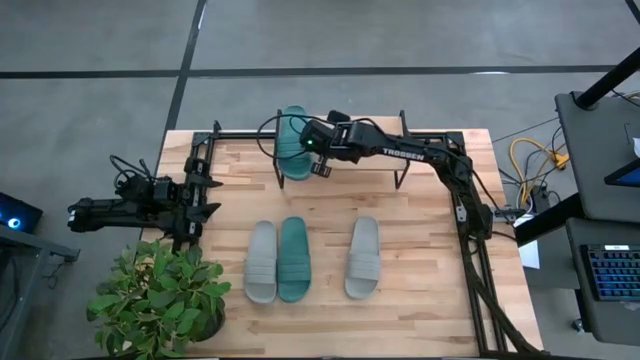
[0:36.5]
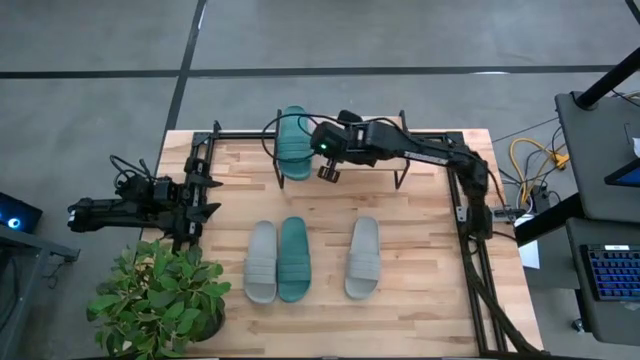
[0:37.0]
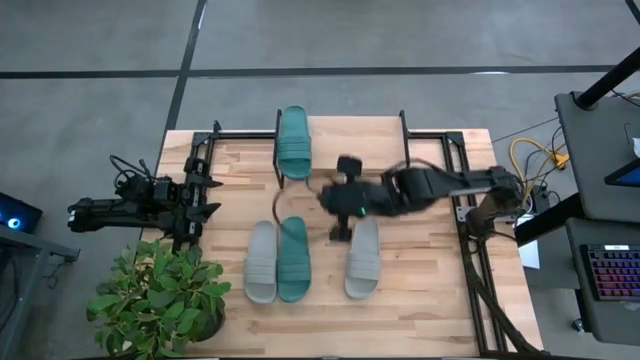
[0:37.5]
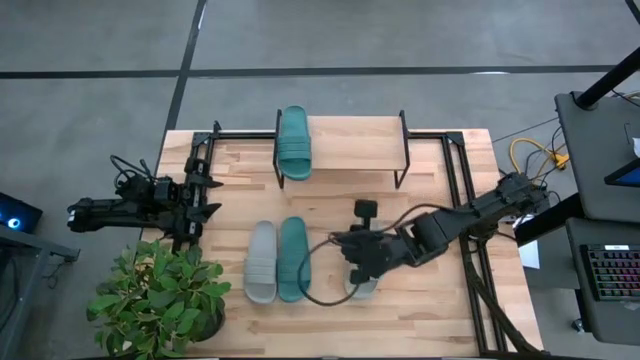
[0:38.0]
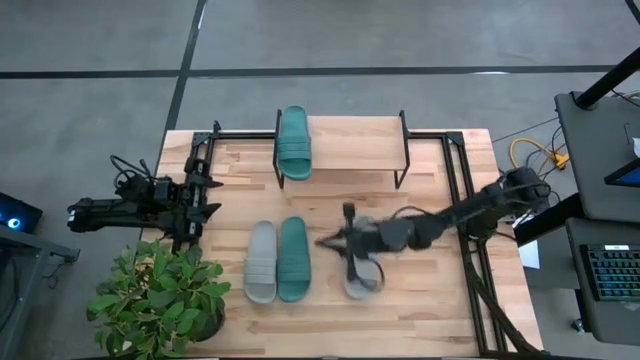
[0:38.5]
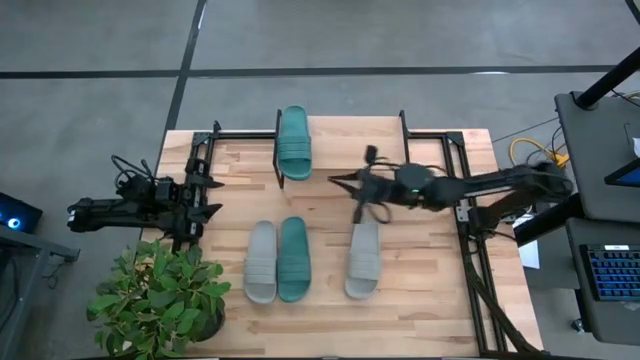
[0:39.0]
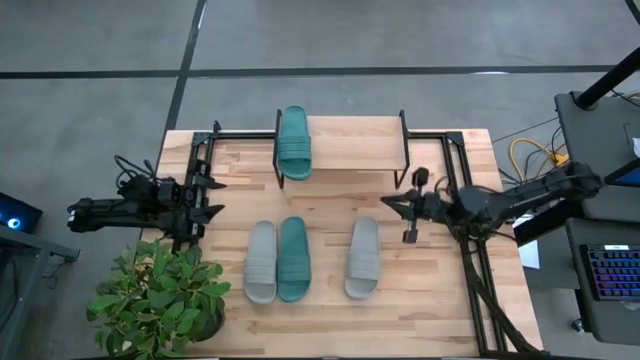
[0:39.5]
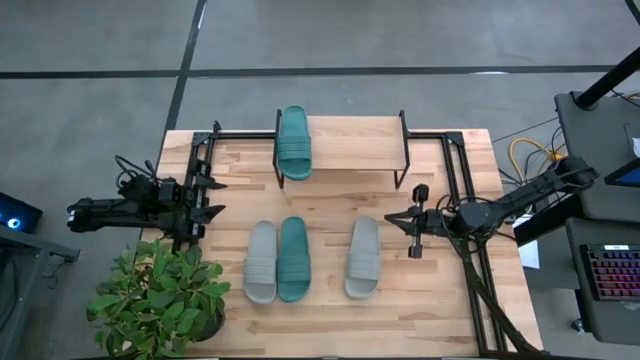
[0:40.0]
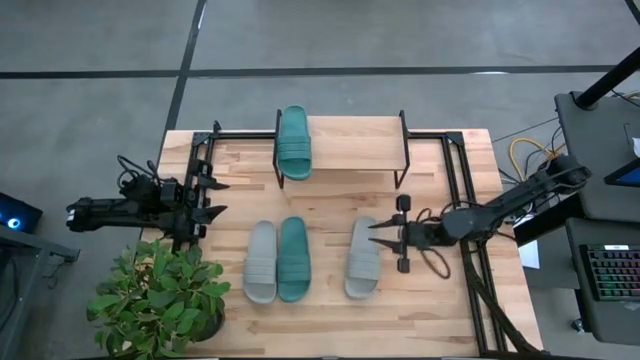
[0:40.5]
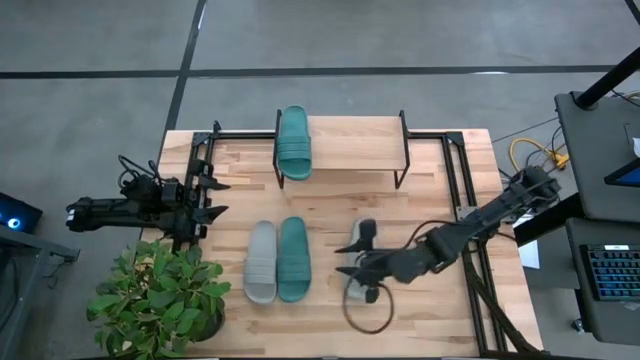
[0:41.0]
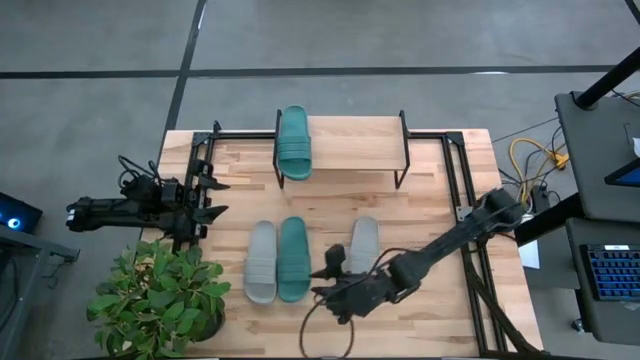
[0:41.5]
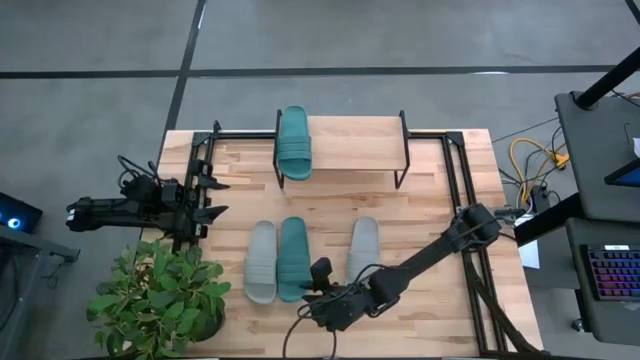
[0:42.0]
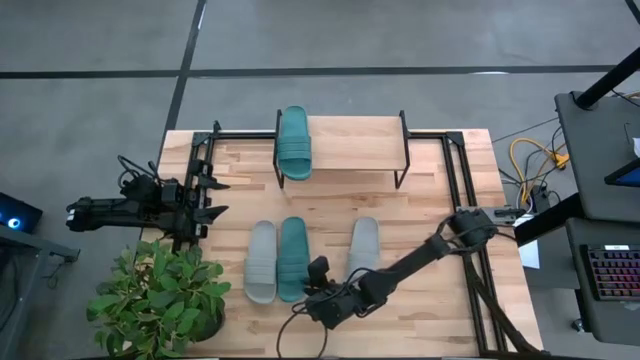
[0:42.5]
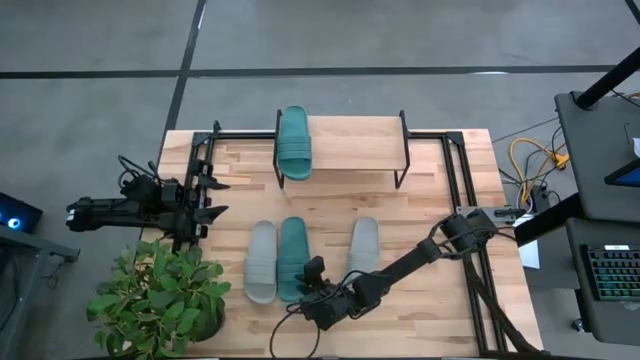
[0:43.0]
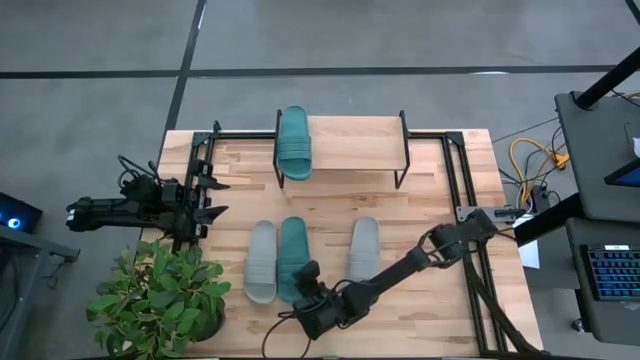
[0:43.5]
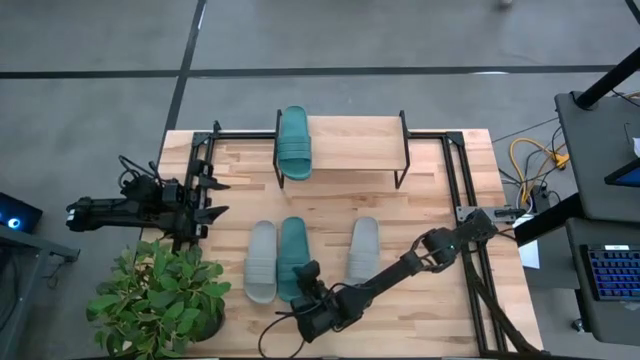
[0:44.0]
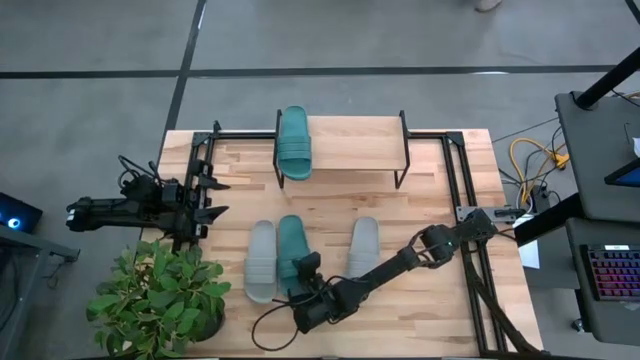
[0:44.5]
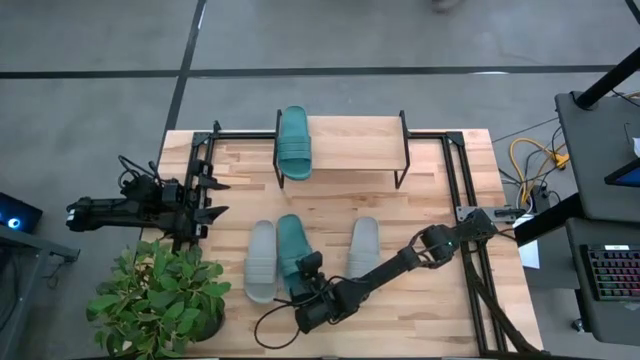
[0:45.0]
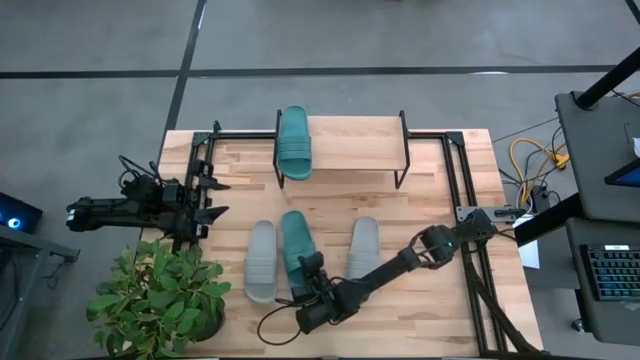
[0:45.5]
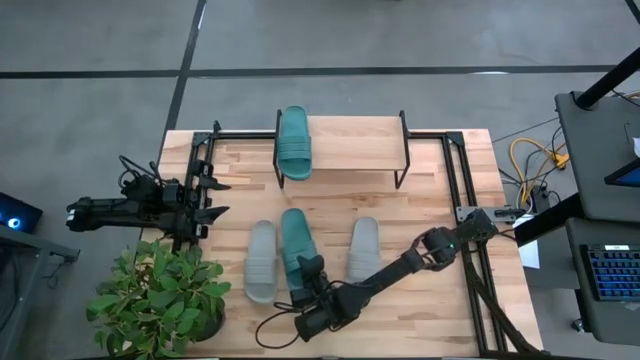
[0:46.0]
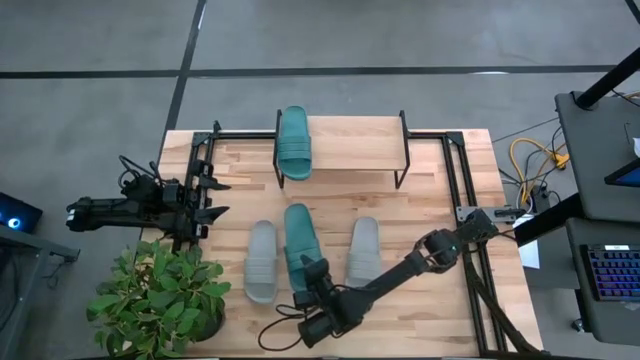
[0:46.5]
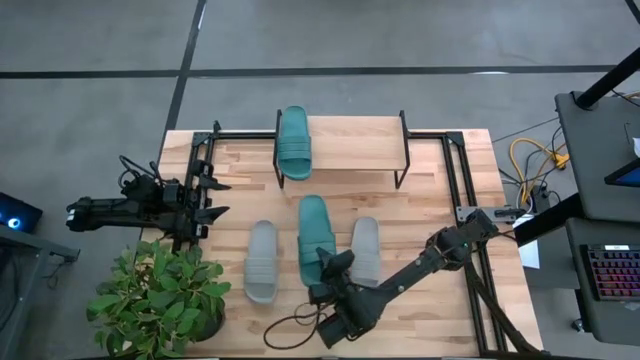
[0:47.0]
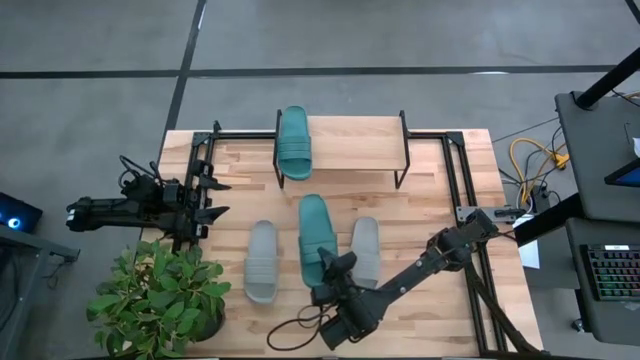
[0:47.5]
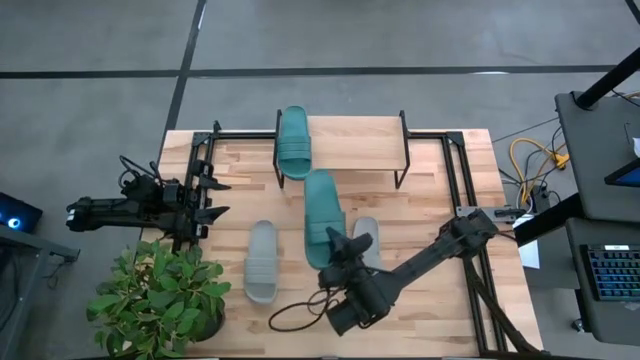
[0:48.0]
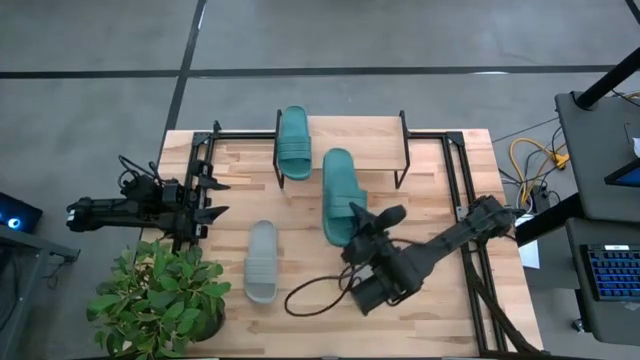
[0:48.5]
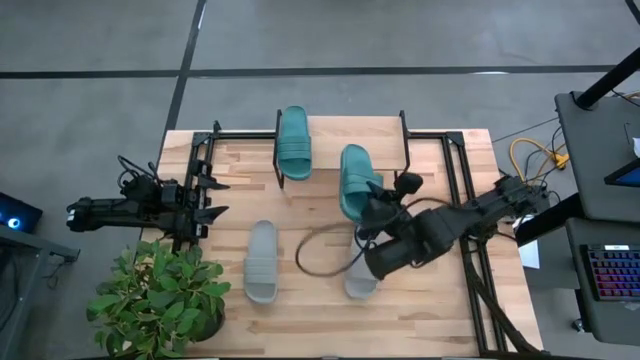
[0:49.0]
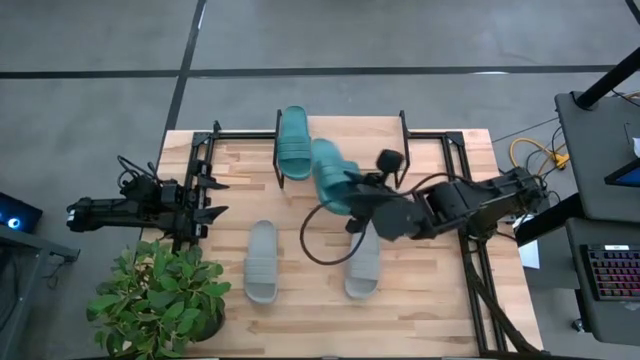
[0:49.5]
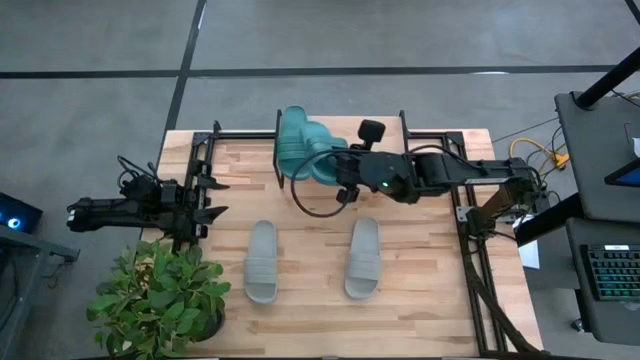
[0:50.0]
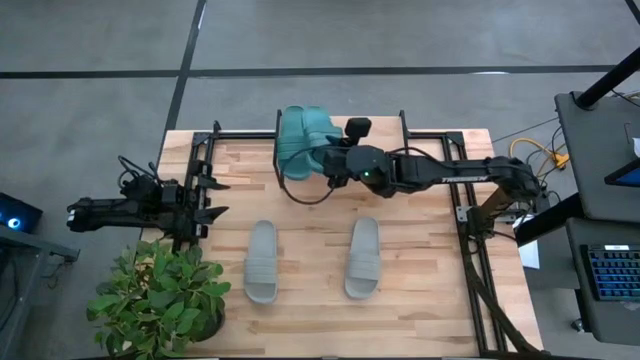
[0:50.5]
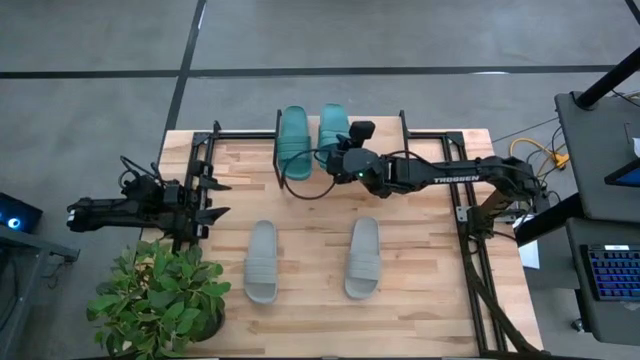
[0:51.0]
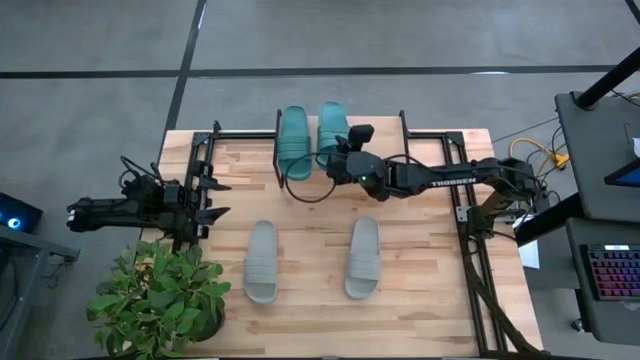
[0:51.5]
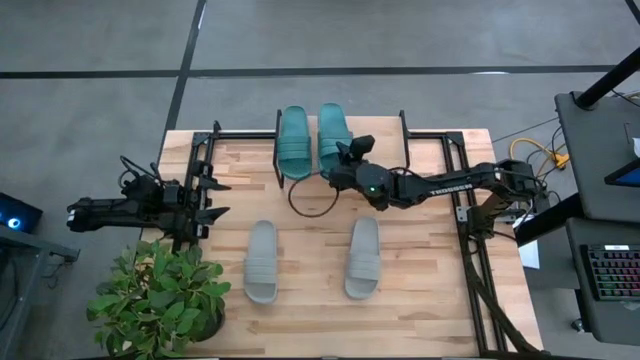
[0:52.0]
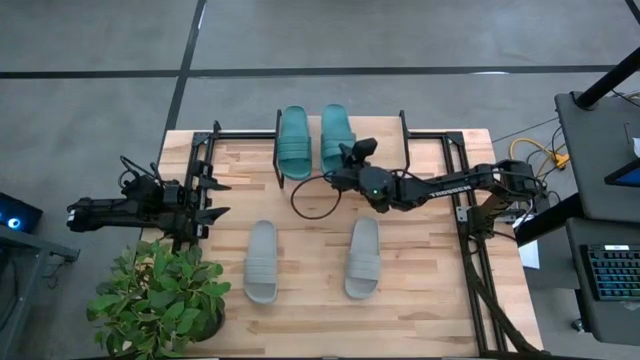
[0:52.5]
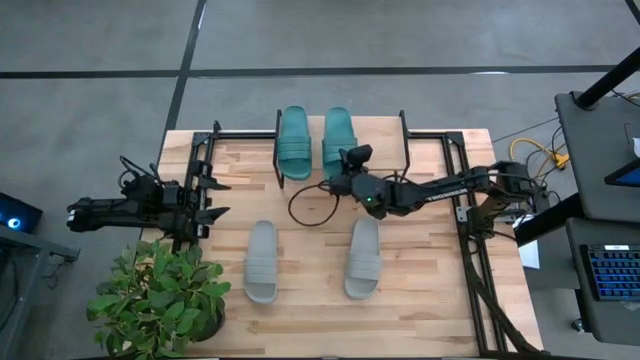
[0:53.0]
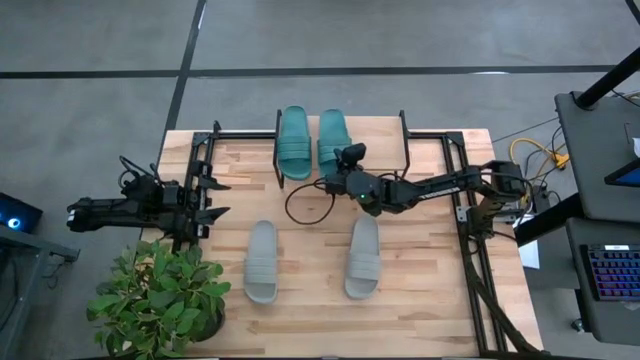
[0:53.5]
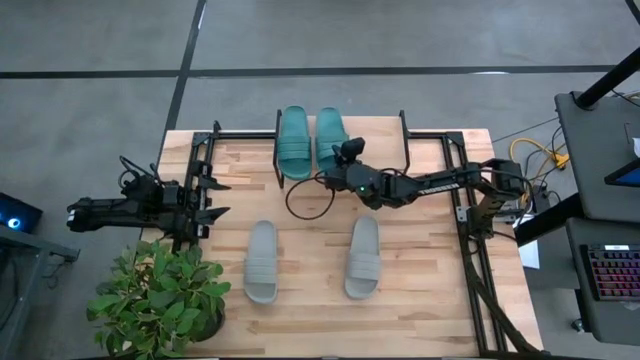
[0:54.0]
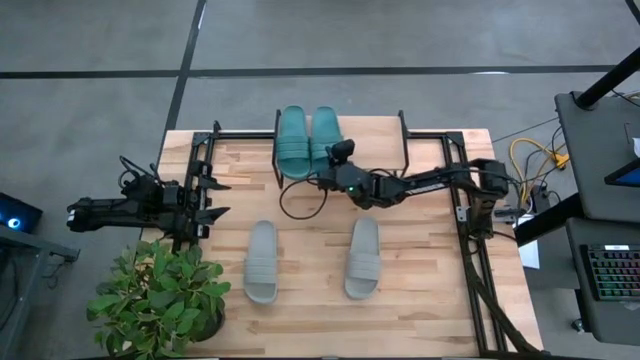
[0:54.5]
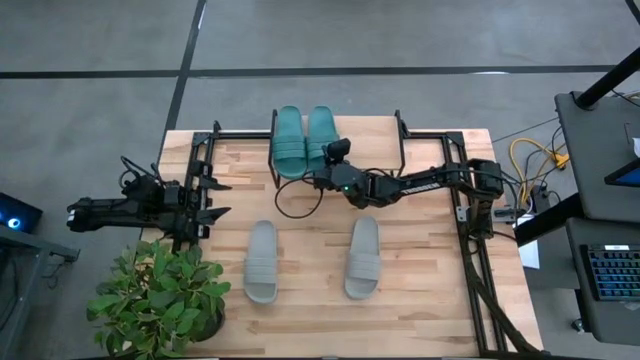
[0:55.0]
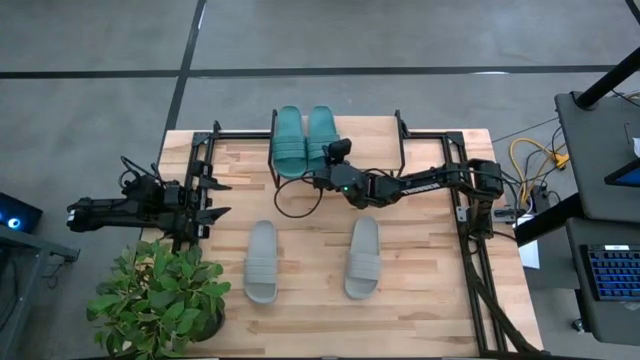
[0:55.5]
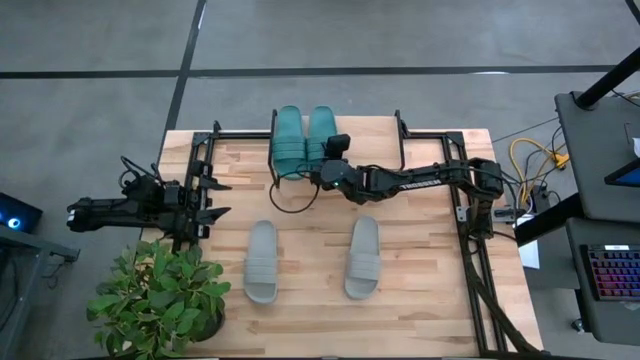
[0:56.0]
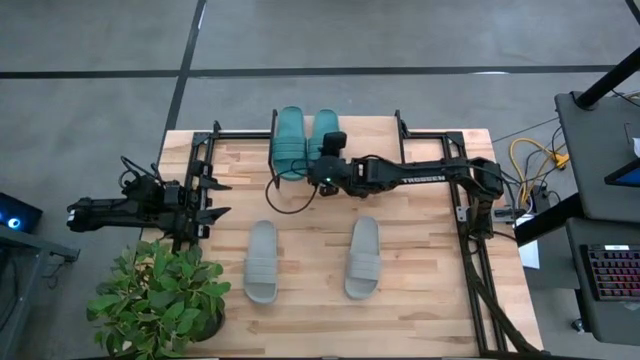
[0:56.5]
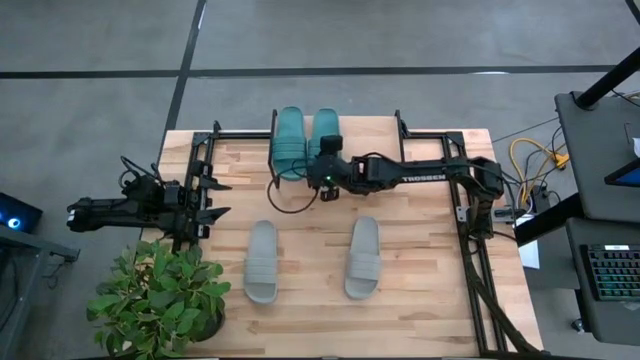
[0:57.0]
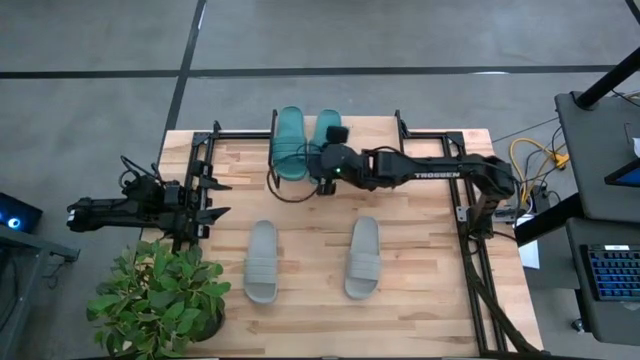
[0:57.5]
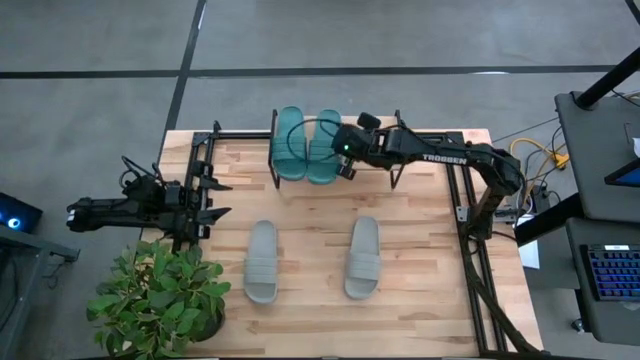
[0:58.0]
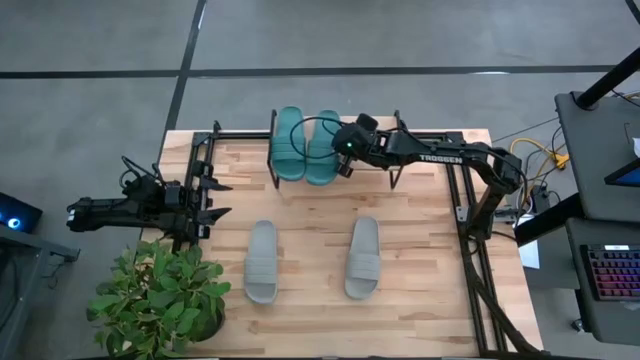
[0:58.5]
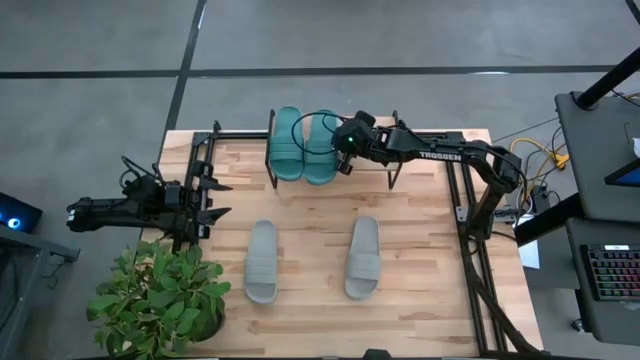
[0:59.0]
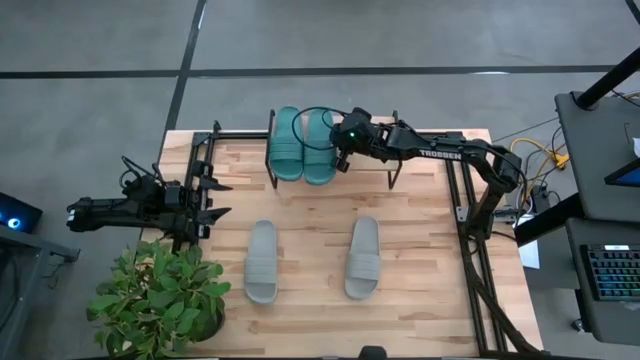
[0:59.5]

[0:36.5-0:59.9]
Task: Pick and place slides into the shelf
Put the green slide on the shelf next to the other green slide
